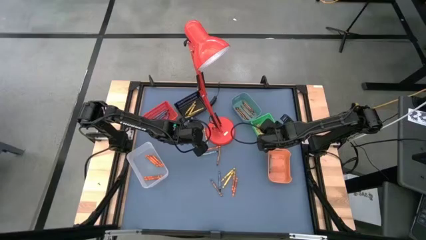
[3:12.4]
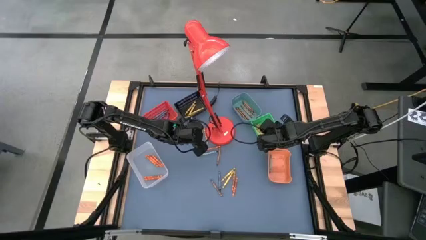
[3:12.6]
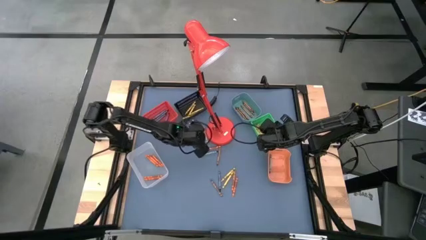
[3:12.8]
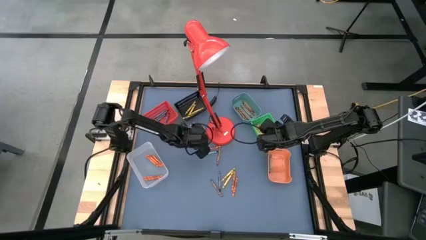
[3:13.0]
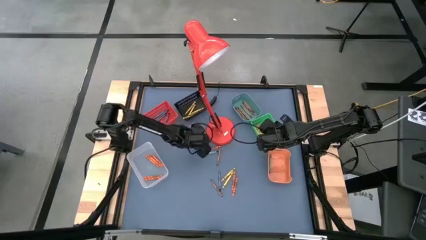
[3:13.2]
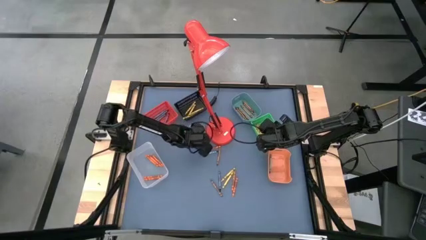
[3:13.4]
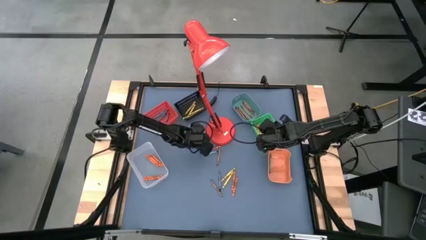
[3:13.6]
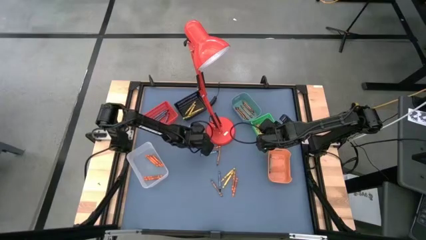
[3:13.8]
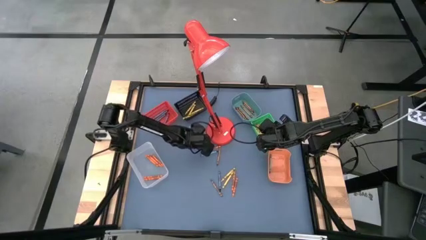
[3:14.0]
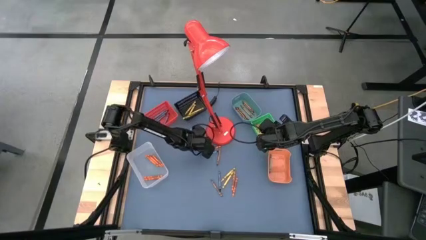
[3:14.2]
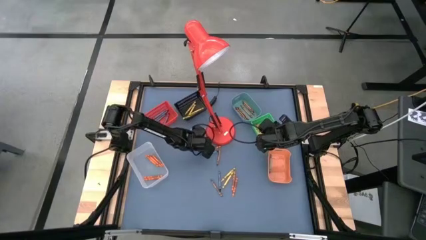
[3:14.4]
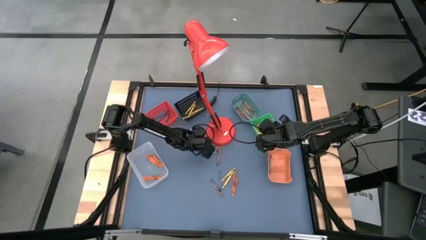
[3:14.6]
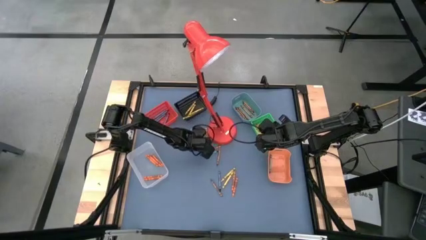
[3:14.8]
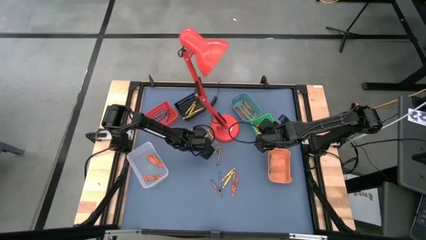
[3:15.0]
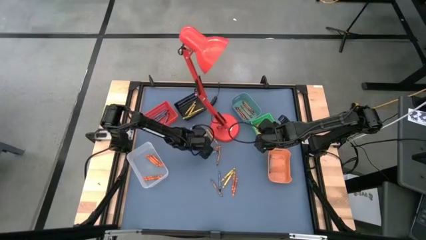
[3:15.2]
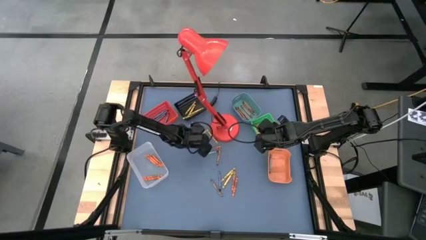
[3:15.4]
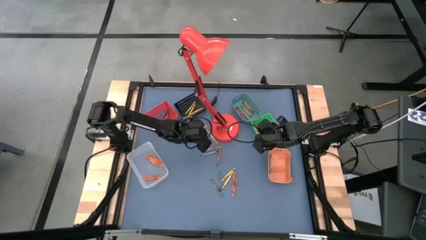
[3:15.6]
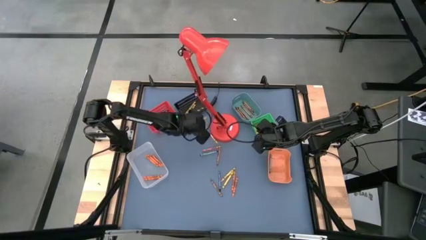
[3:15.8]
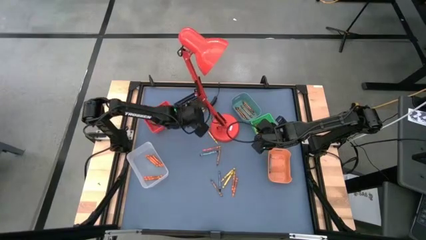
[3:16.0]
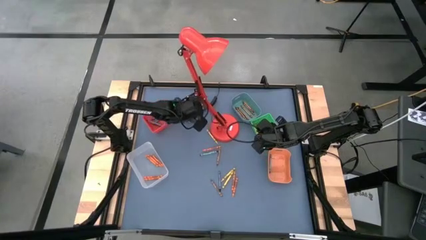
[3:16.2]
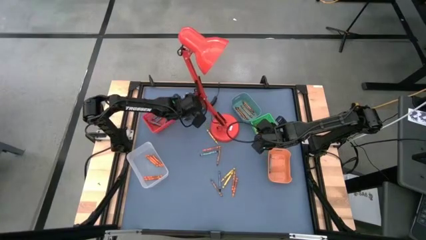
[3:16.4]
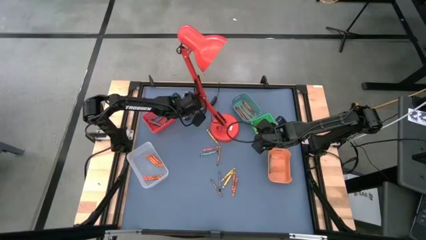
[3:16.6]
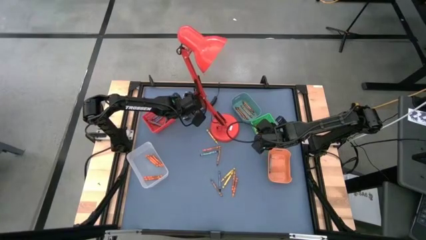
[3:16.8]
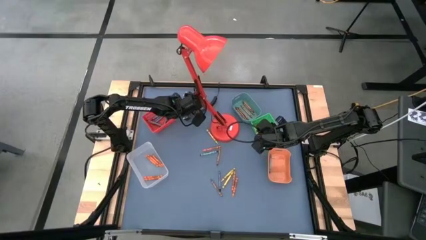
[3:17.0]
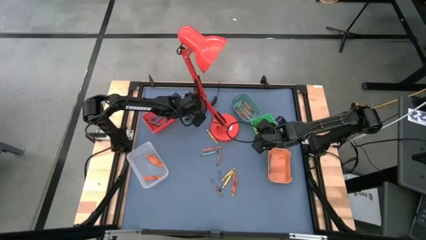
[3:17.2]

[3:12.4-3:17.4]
Task: Sort crayons
Put the yellow crayon into the top left black bin

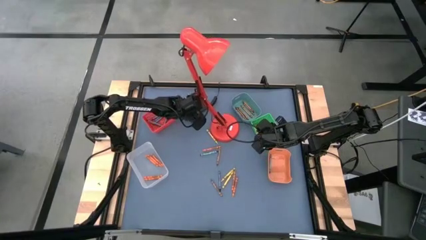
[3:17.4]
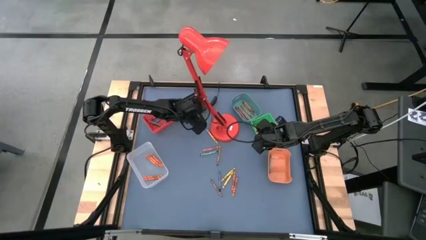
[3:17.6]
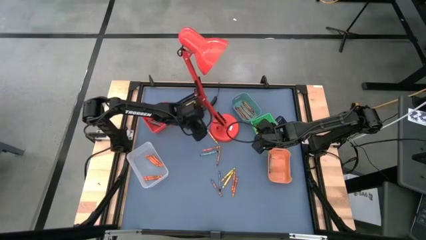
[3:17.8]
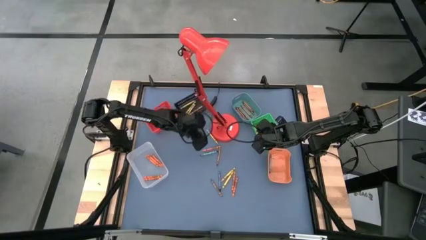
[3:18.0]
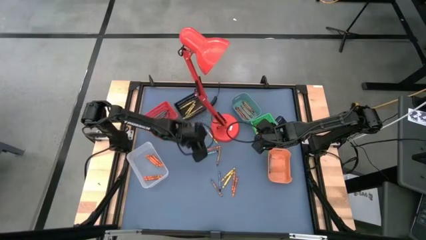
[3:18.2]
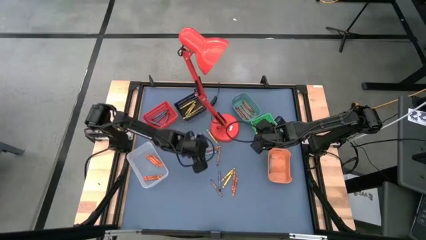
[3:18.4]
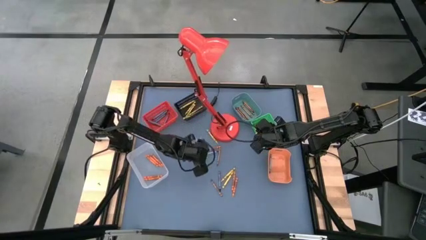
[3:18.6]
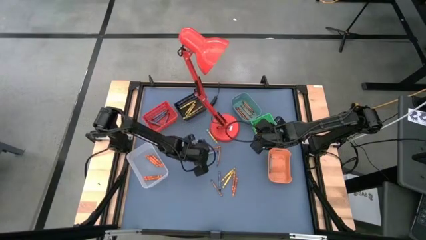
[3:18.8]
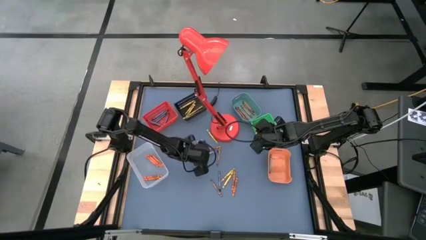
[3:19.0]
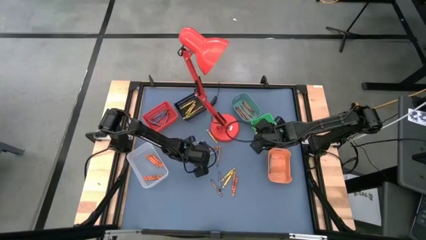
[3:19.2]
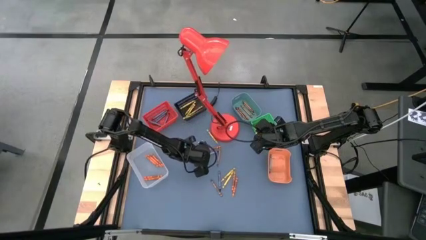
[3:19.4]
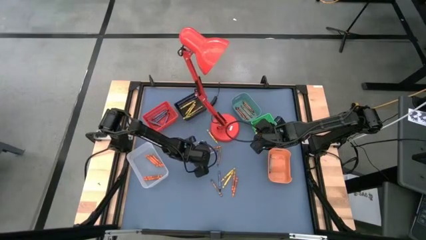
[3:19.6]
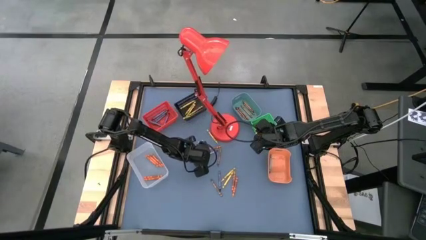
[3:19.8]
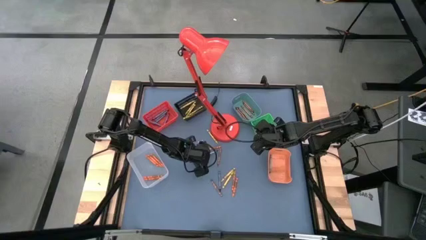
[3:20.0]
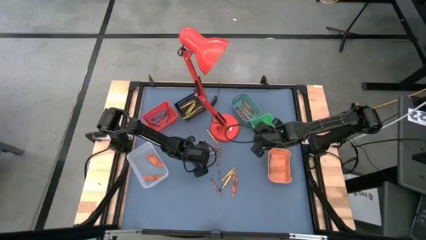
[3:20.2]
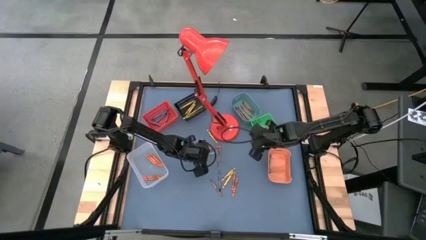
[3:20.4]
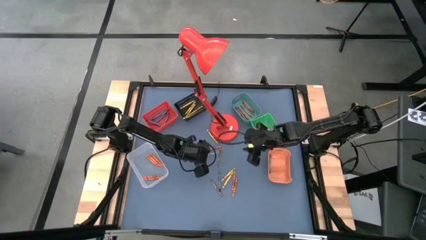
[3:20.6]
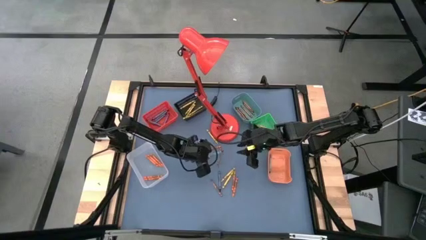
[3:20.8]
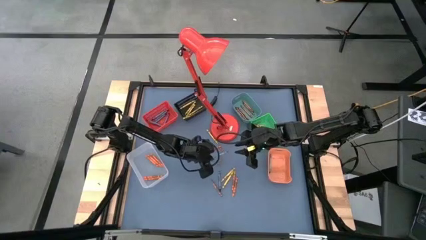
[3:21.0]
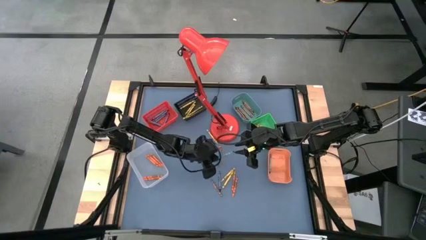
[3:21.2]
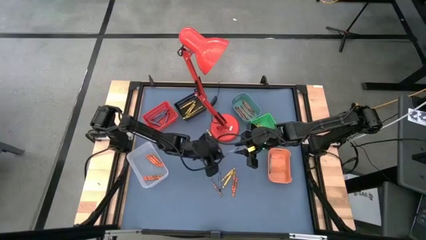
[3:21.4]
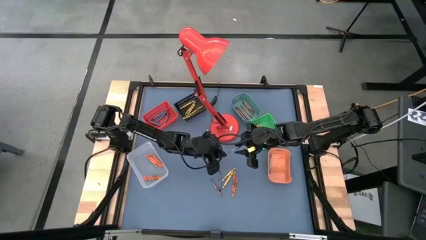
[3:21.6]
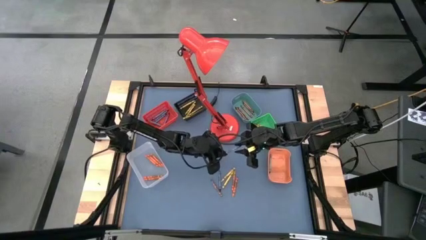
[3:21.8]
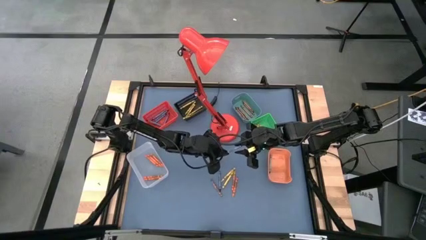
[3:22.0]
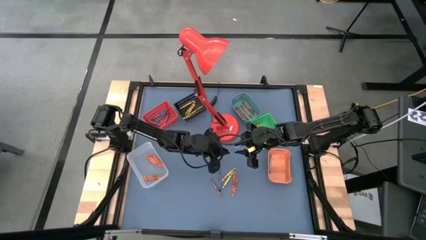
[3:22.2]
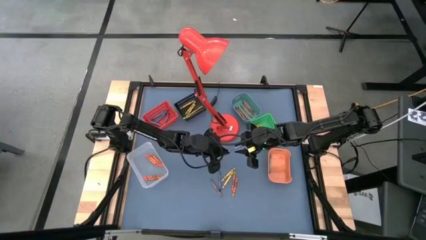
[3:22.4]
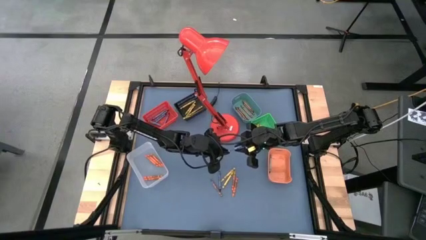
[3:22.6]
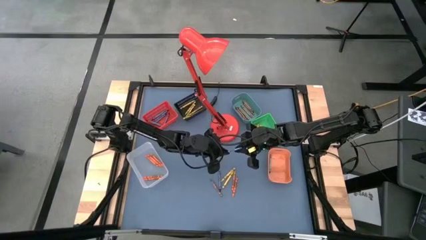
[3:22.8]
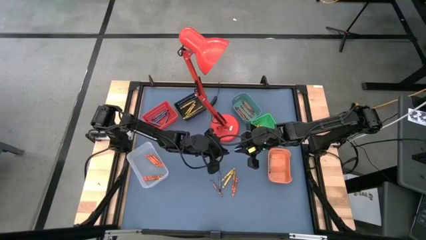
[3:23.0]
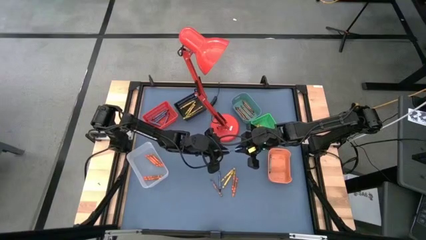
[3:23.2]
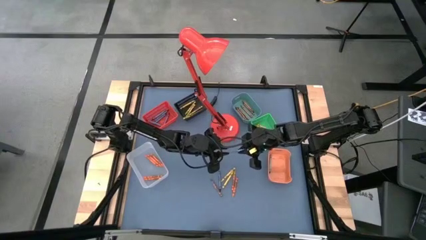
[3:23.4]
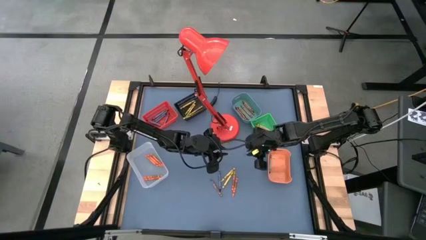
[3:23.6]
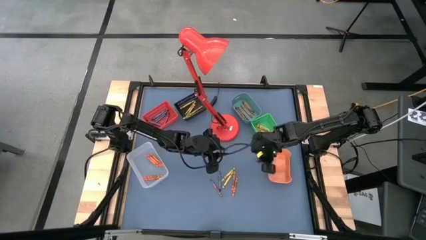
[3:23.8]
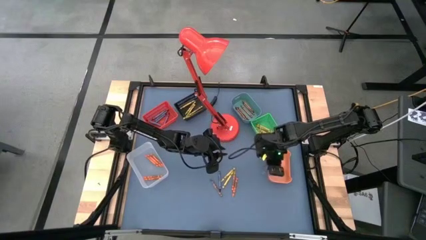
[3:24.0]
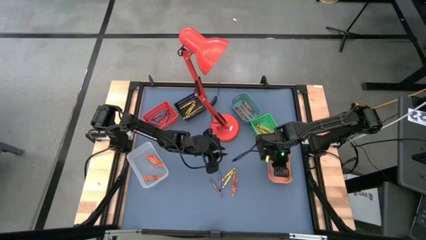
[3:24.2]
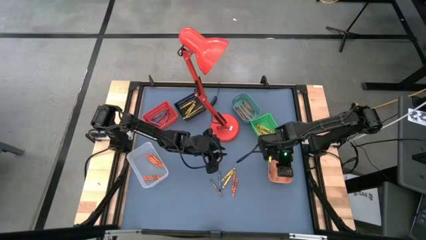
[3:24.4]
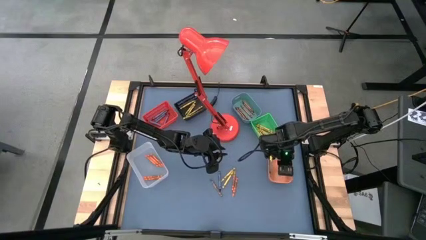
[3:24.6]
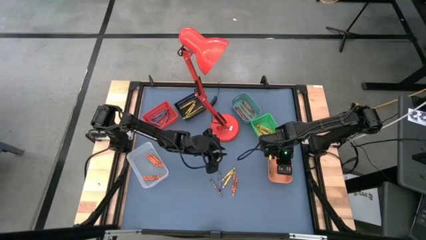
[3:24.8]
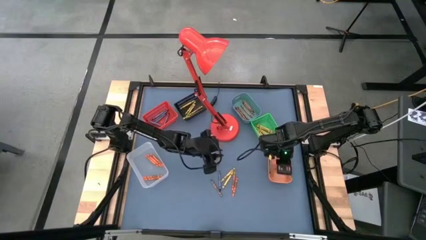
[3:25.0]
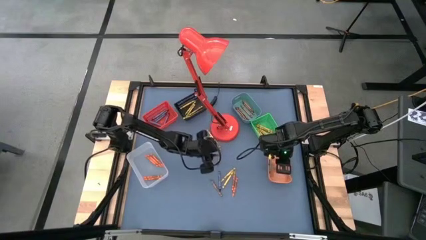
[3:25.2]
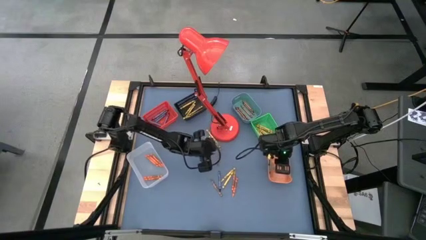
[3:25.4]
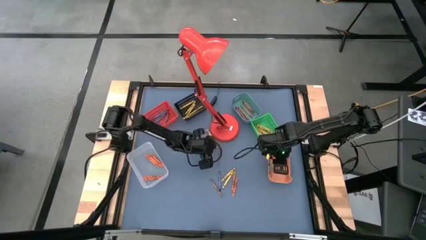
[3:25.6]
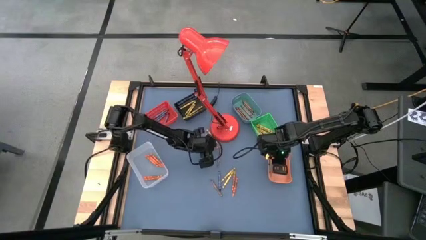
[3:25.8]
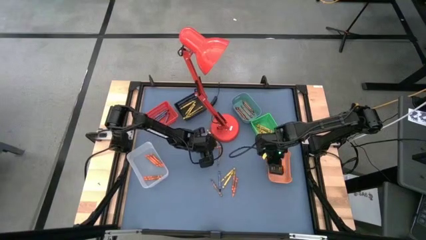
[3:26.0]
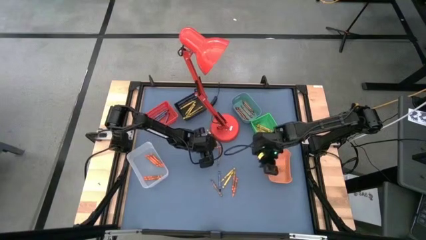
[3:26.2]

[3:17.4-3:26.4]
Put the blue green crayon into the bottom right orange bin

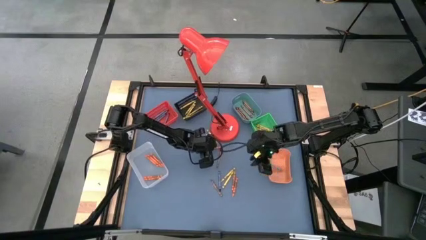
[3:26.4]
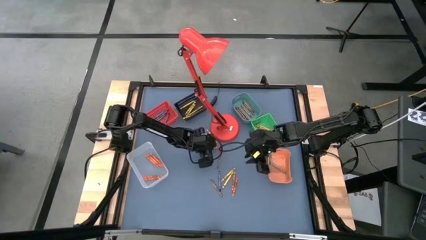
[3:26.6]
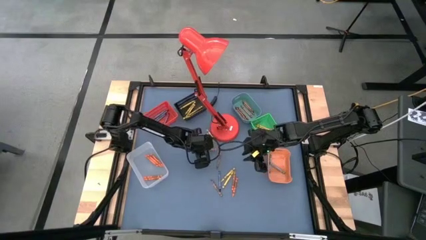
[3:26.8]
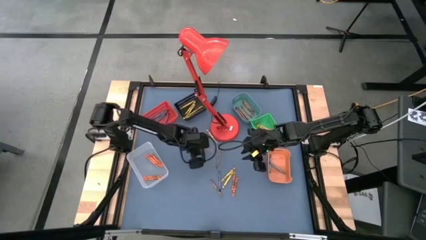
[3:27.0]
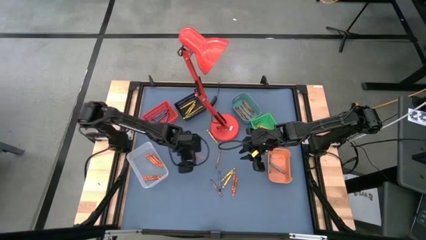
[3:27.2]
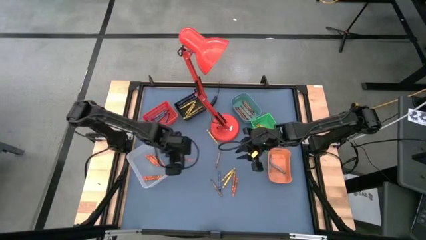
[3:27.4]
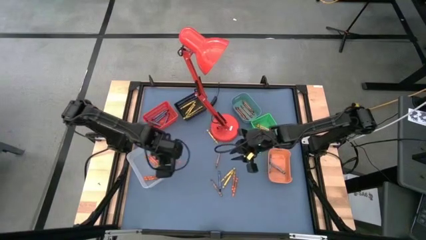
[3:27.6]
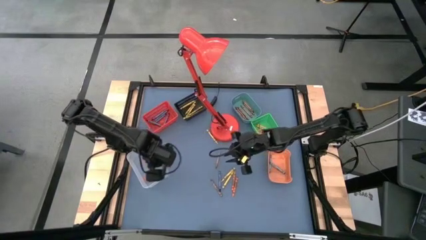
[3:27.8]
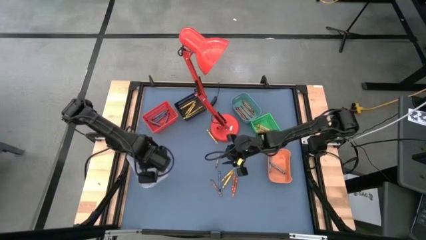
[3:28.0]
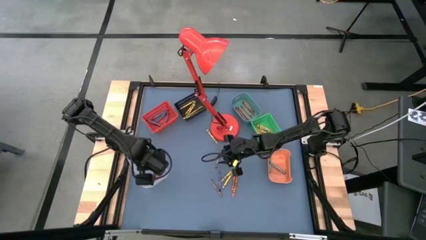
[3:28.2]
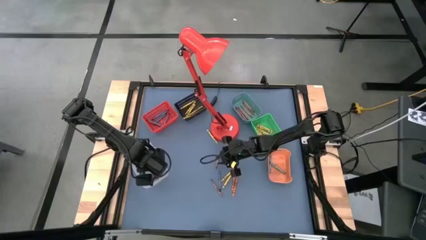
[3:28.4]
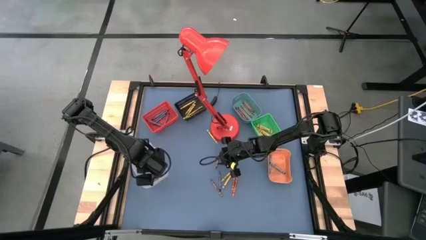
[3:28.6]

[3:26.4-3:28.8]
Put the orange crayon into the bottom left transparent bin
